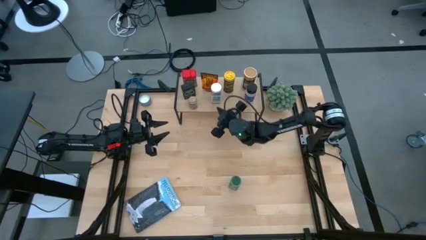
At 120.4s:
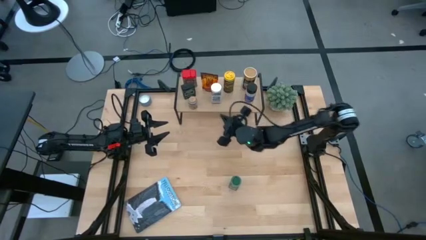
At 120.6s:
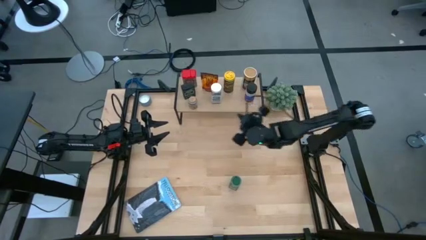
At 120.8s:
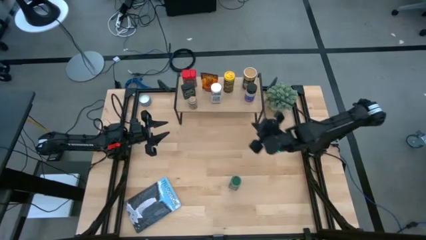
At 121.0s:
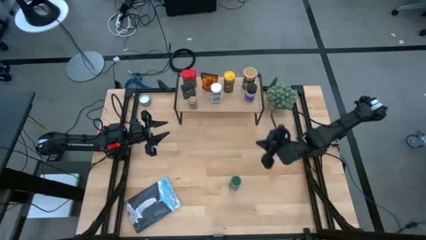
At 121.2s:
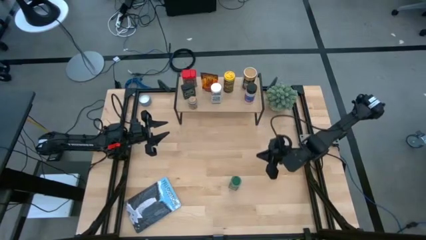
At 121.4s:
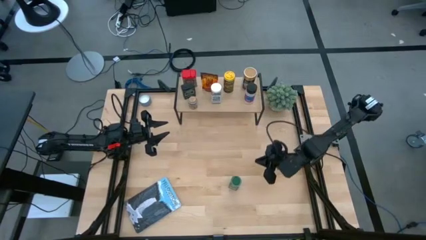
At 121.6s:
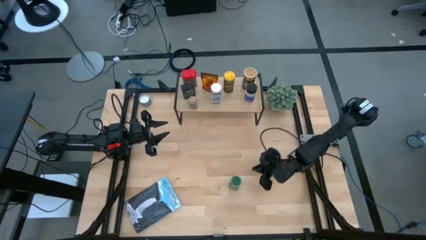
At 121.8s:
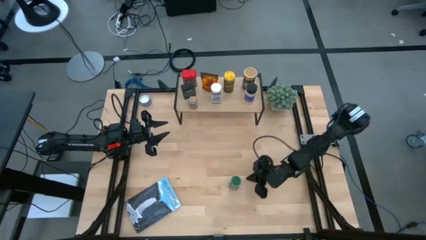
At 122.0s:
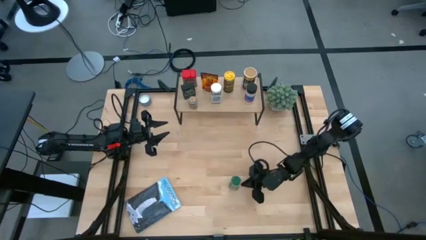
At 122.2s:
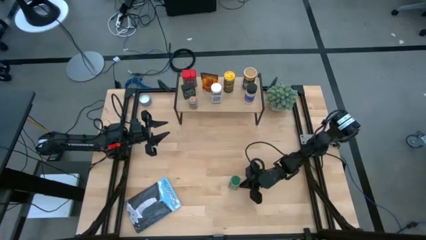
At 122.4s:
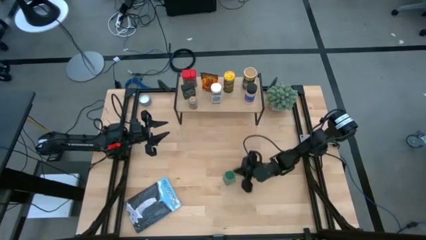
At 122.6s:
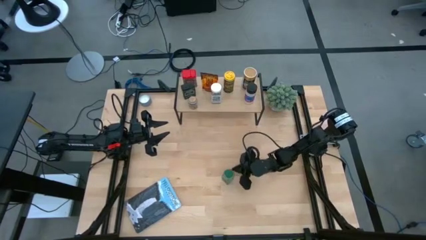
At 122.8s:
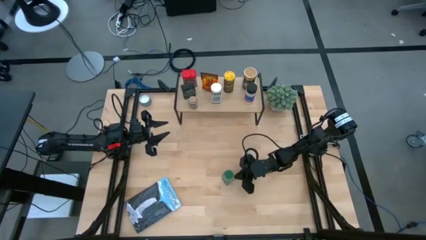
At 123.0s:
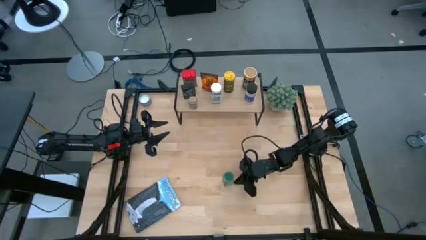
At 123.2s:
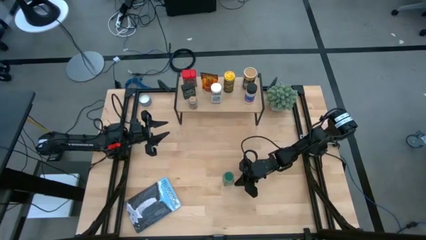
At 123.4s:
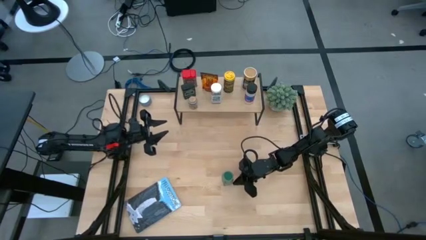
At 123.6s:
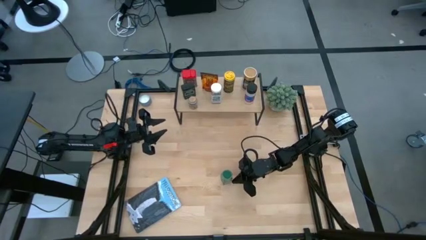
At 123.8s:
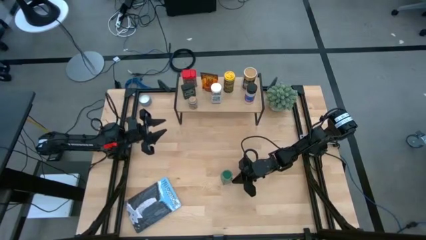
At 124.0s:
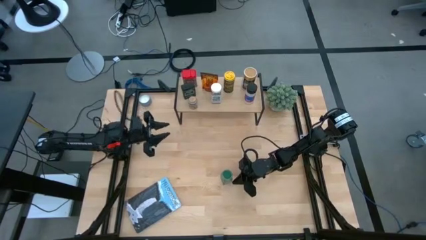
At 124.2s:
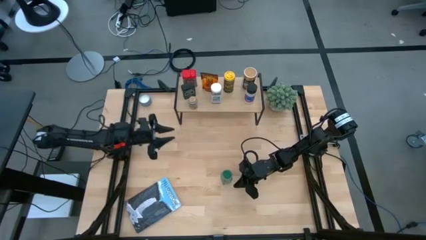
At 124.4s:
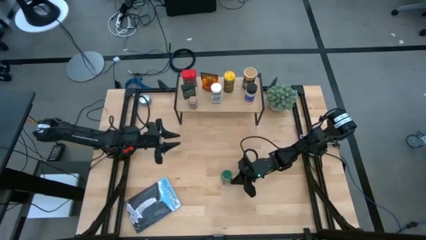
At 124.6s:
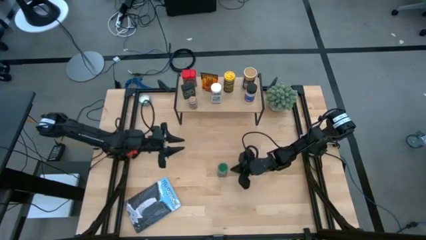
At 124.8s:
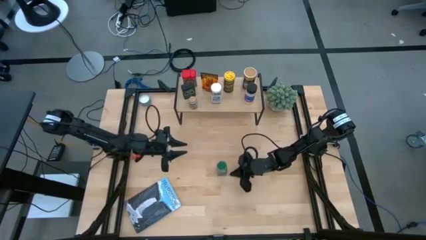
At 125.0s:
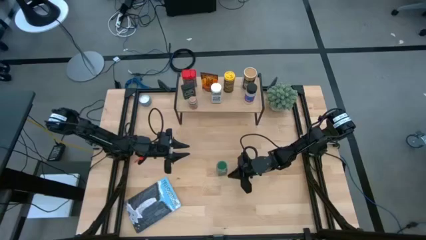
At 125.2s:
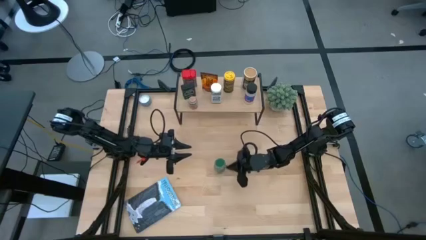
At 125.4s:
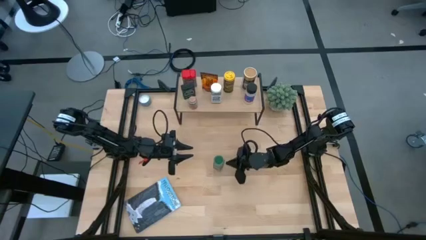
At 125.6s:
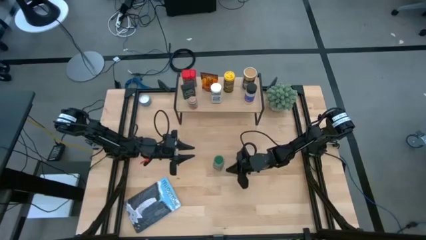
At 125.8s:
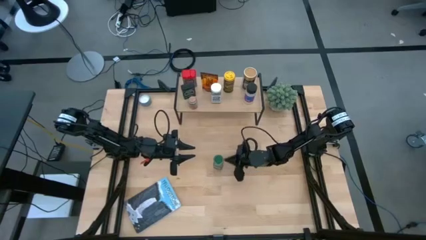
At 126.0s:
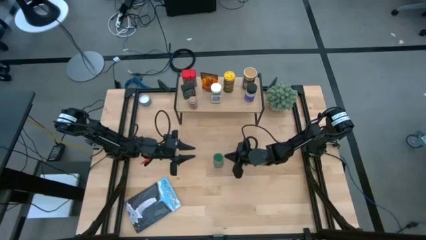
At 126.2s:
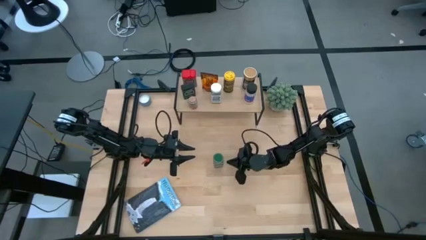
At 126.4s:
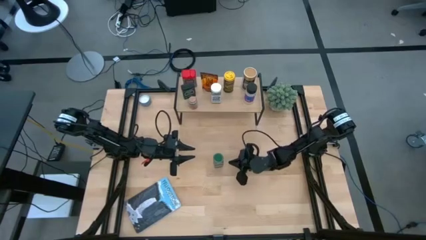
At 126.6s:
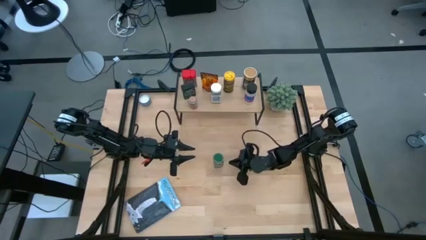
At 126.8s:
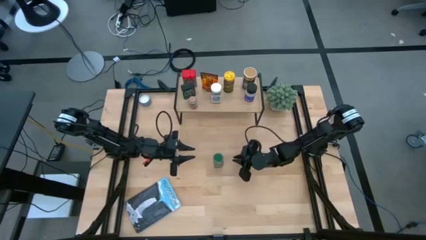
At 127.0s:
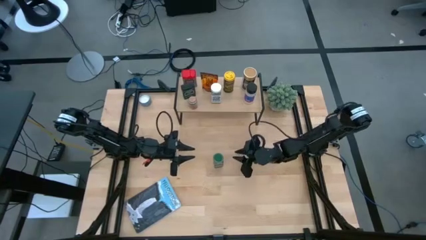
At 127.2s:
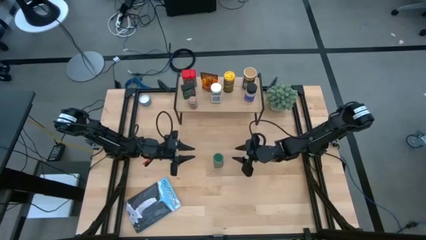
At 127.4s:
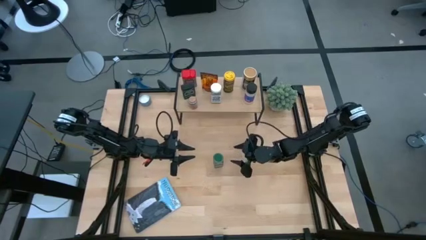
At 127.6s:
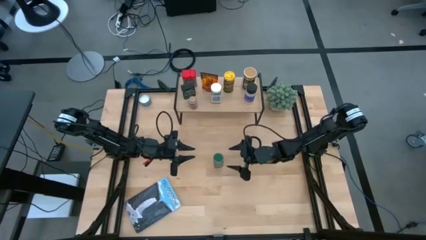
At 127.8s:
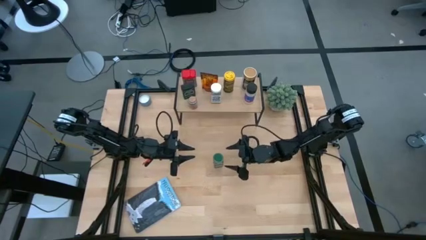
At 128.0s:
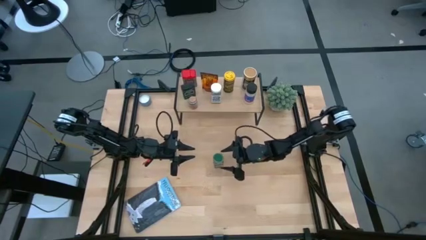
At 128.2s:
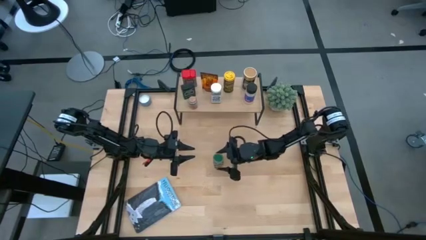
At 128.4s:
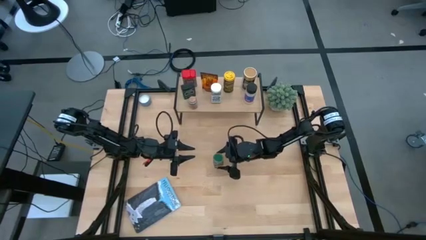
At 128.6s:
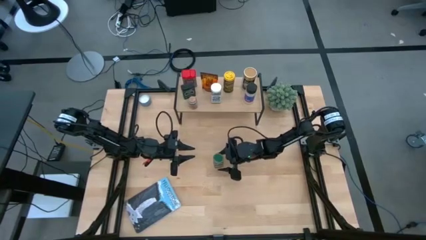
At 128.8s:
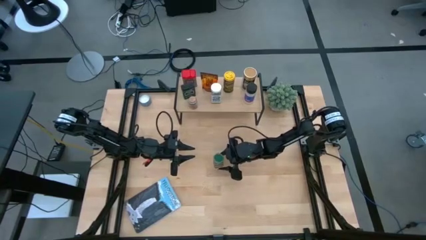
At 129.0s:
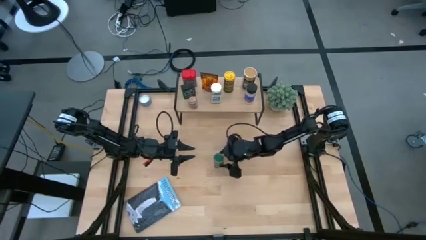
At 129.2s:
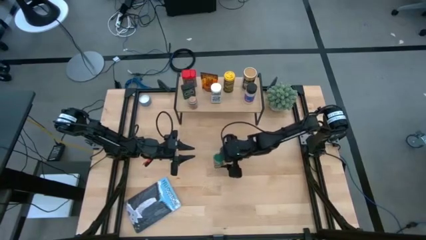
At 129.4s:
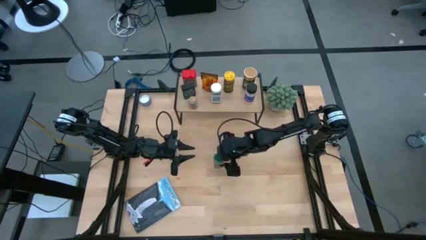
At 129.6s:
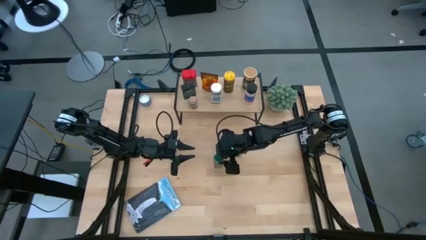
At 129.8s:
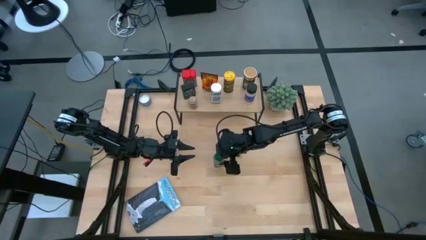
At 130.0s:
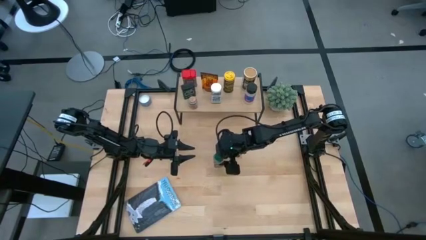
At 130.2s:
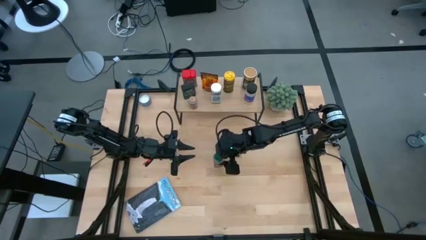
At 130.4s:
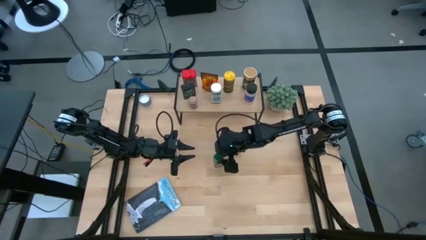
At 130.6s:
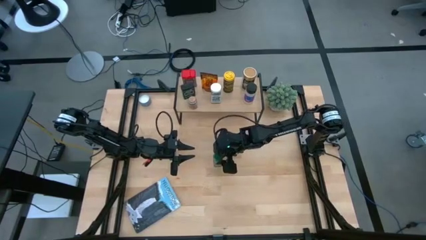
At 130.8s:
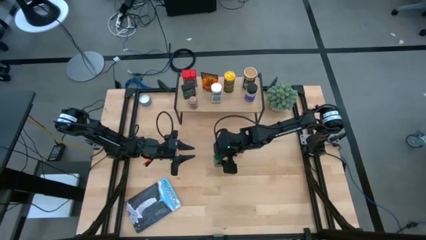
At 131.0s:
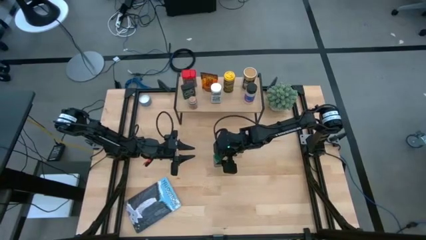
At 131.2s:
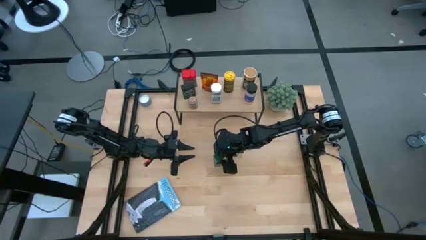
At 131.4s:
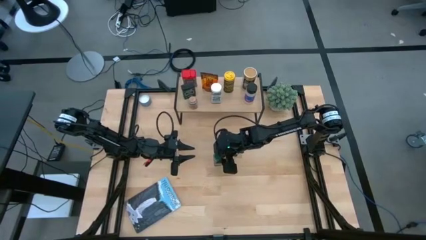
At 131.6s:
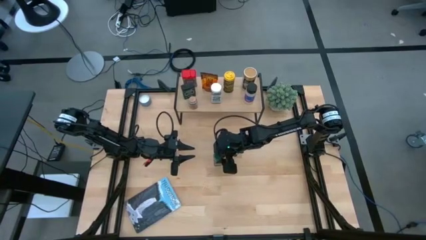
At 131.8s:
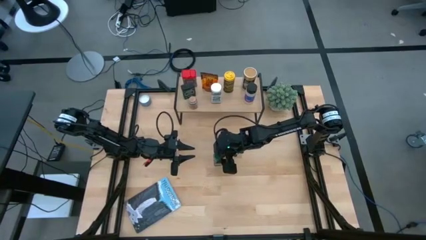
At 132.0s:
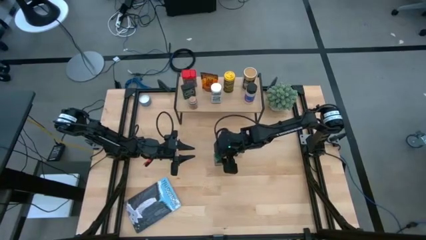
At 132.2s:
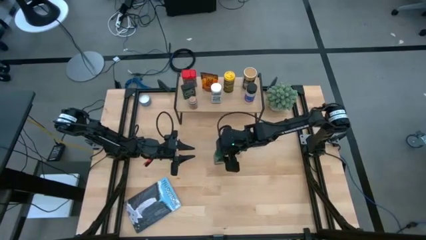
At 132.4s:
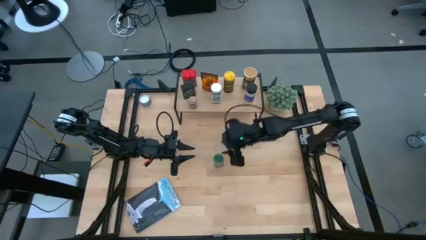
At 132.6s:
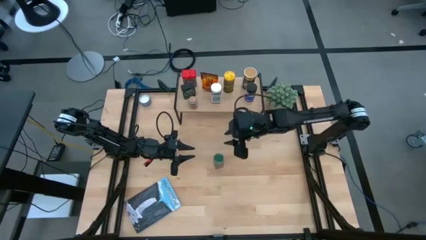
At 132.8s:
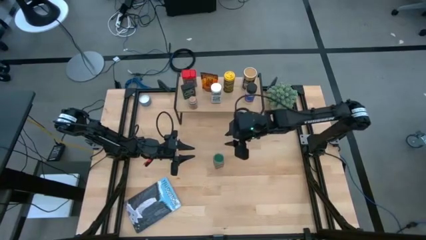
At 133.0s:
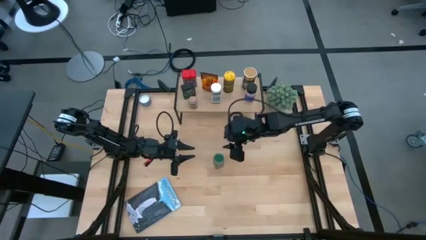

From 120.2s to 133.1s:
Task: Shelf spices
Put the green seasoning on the shelf
